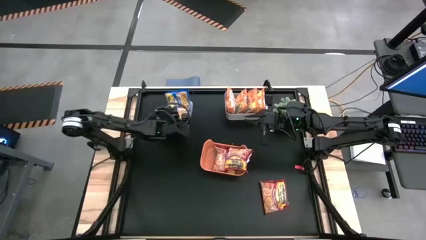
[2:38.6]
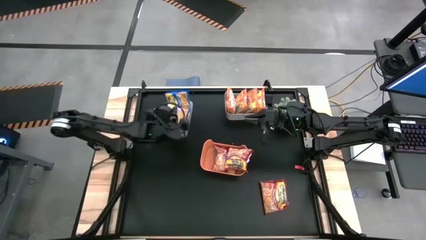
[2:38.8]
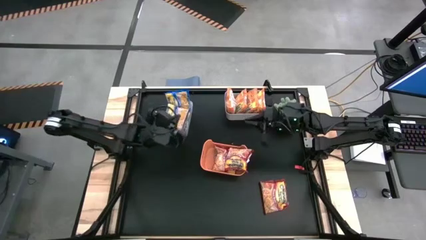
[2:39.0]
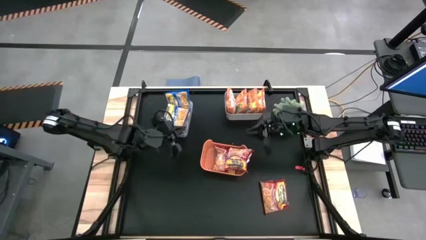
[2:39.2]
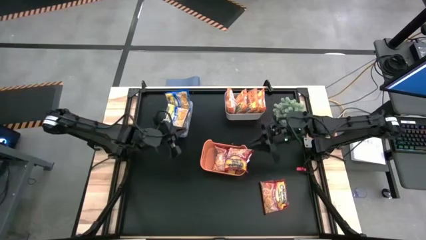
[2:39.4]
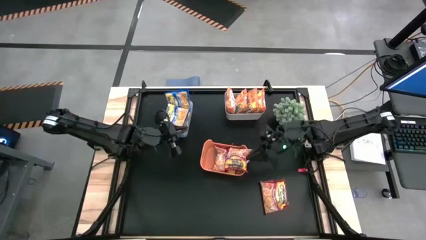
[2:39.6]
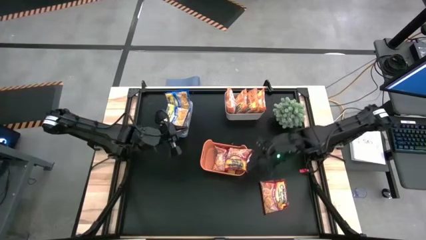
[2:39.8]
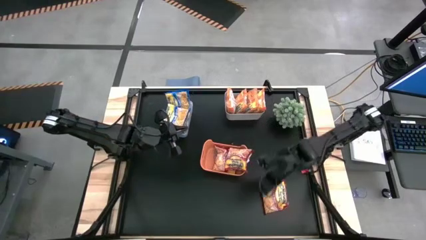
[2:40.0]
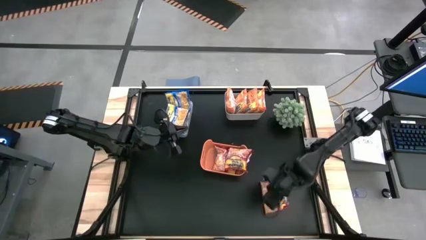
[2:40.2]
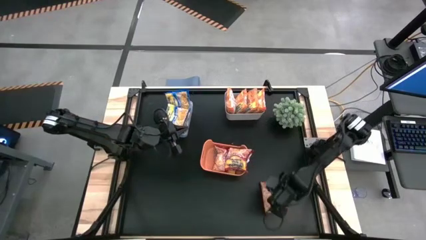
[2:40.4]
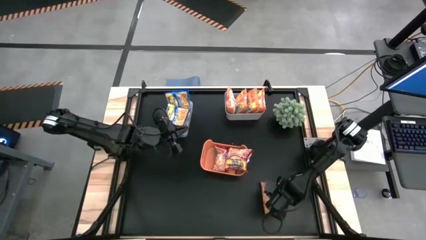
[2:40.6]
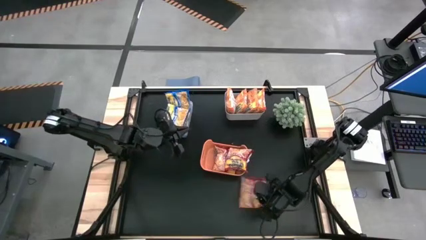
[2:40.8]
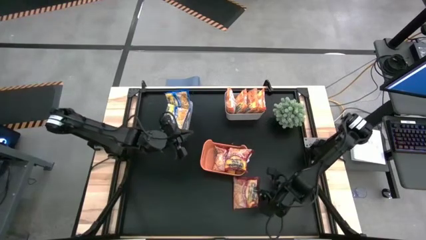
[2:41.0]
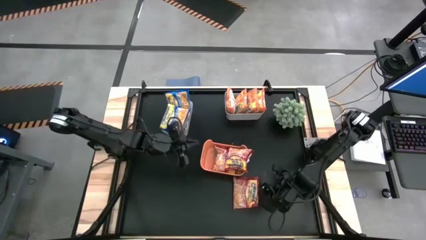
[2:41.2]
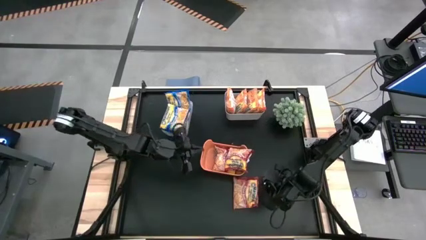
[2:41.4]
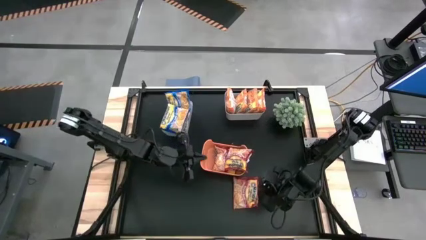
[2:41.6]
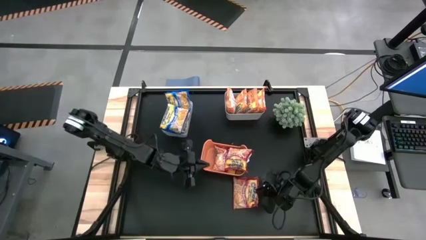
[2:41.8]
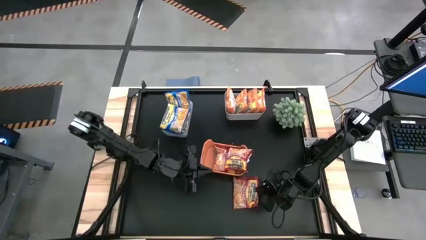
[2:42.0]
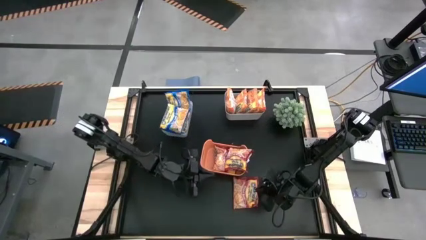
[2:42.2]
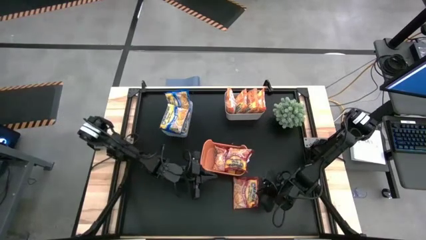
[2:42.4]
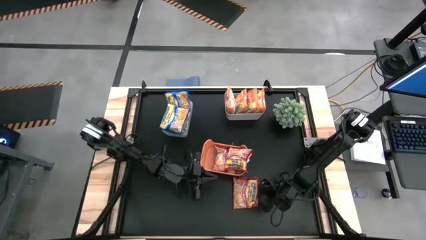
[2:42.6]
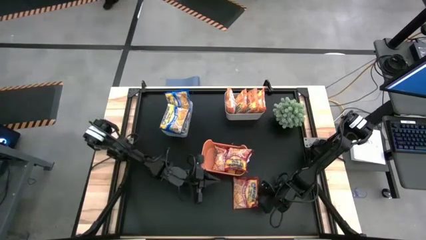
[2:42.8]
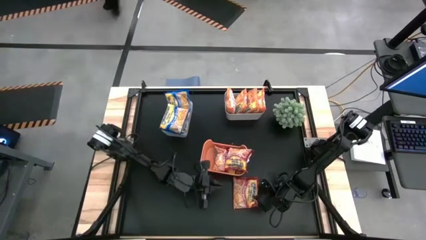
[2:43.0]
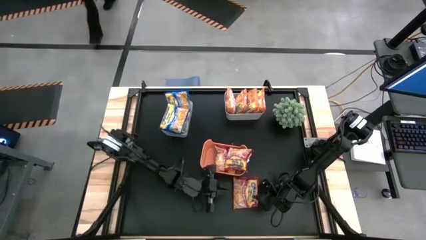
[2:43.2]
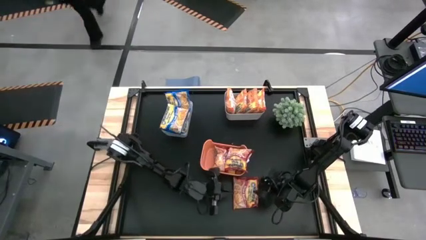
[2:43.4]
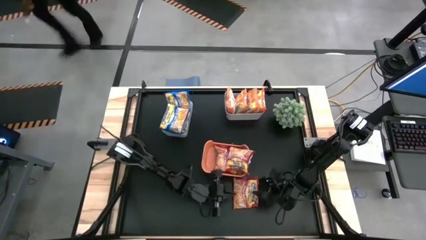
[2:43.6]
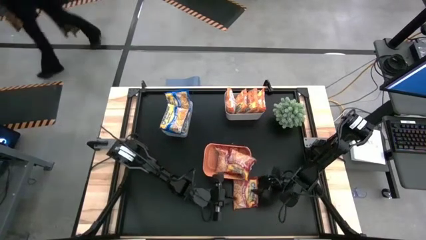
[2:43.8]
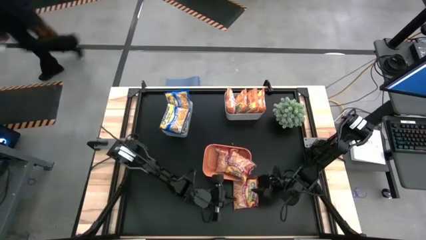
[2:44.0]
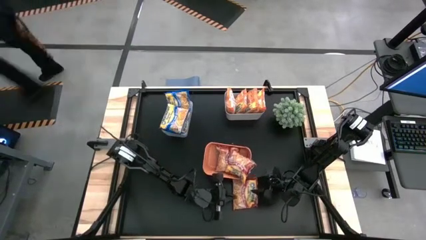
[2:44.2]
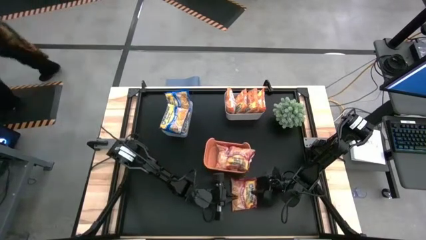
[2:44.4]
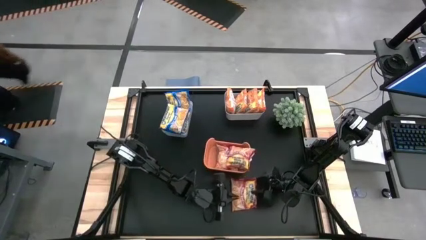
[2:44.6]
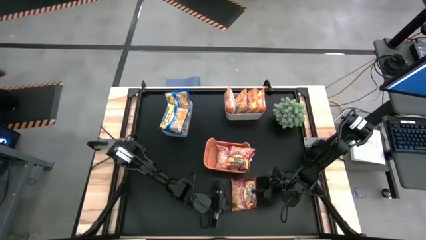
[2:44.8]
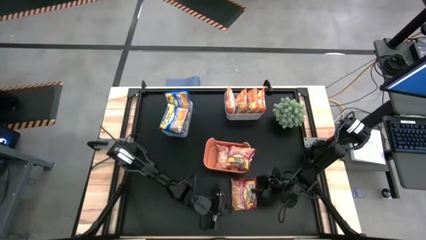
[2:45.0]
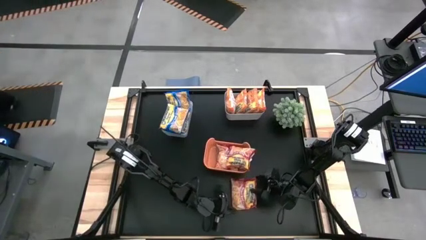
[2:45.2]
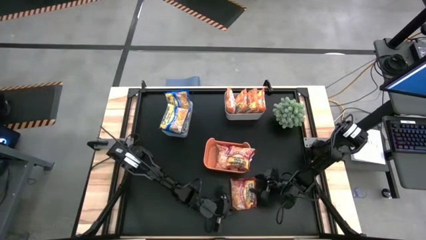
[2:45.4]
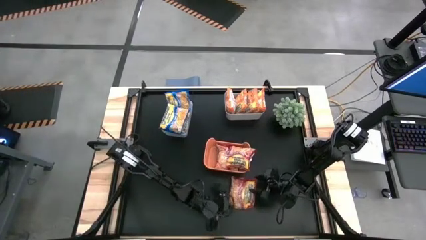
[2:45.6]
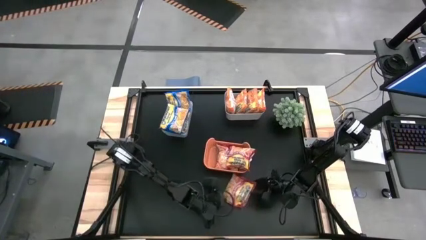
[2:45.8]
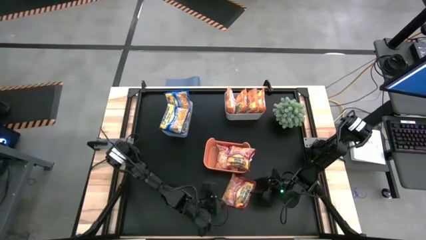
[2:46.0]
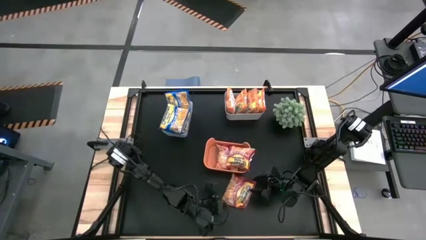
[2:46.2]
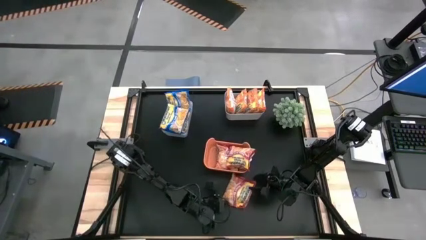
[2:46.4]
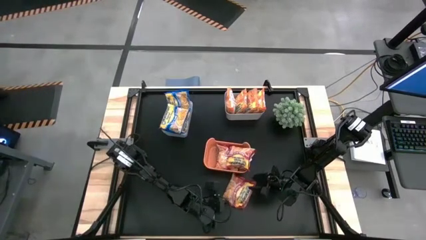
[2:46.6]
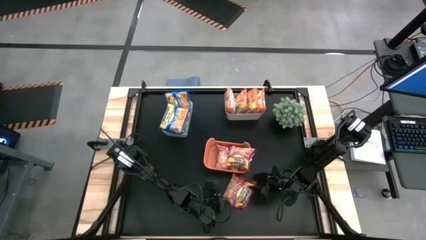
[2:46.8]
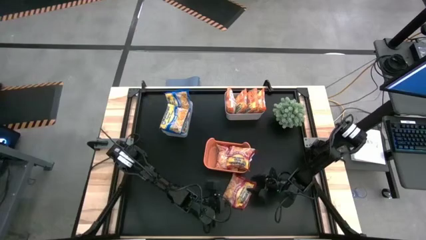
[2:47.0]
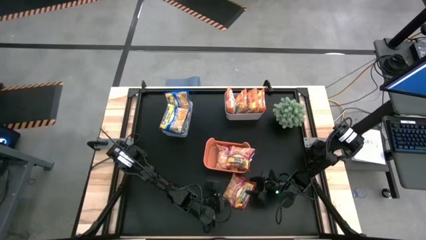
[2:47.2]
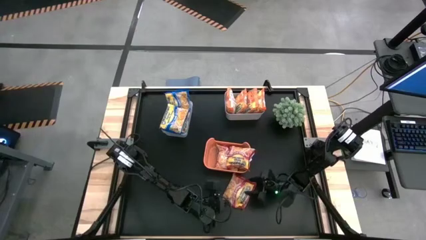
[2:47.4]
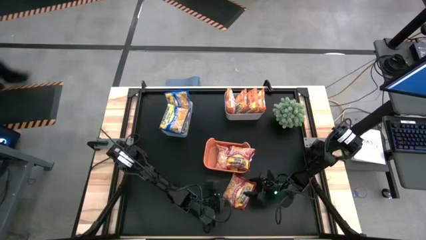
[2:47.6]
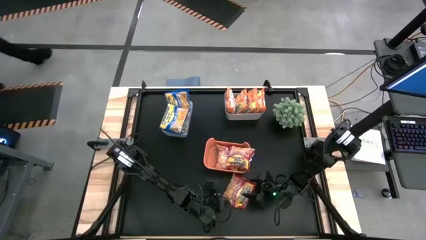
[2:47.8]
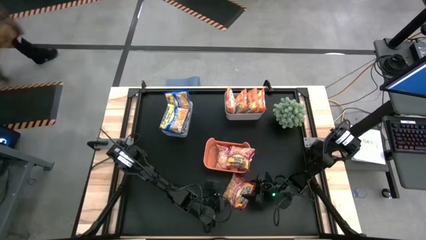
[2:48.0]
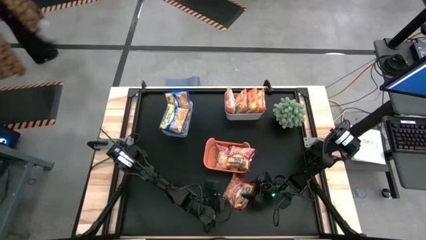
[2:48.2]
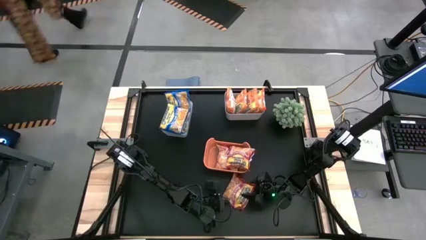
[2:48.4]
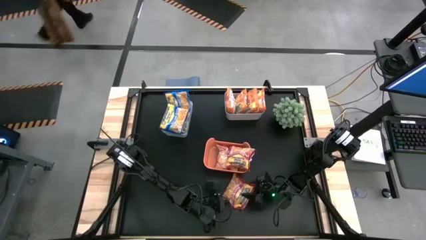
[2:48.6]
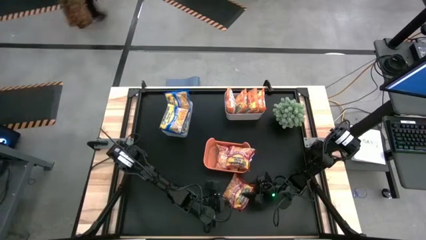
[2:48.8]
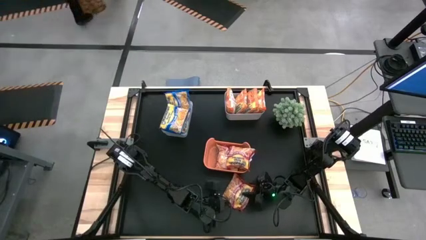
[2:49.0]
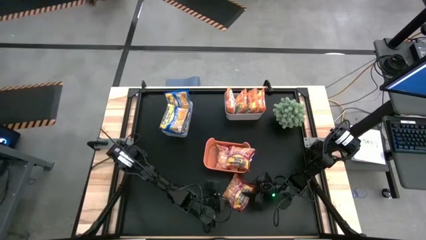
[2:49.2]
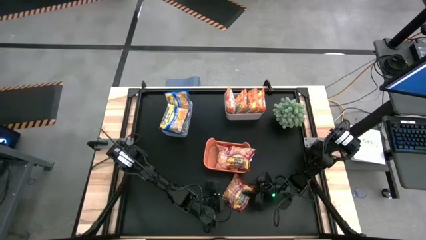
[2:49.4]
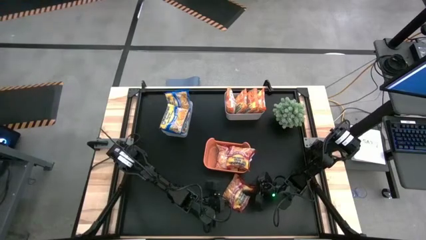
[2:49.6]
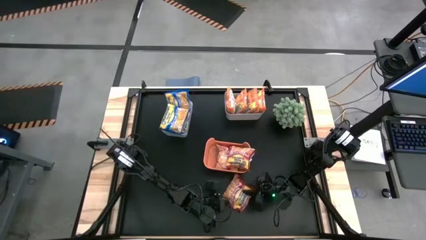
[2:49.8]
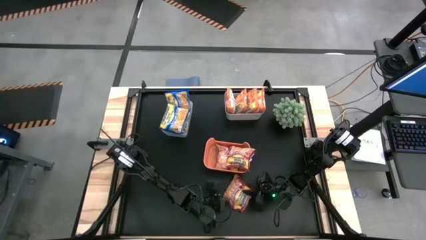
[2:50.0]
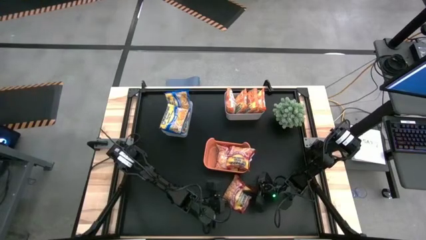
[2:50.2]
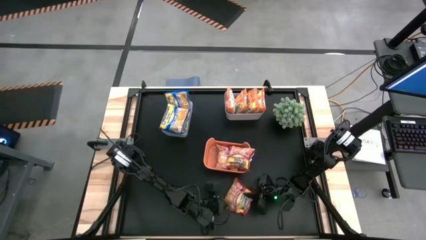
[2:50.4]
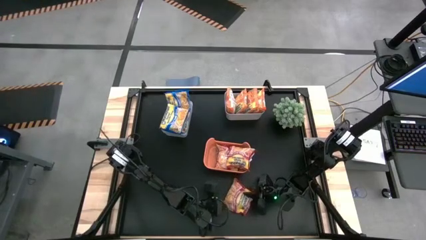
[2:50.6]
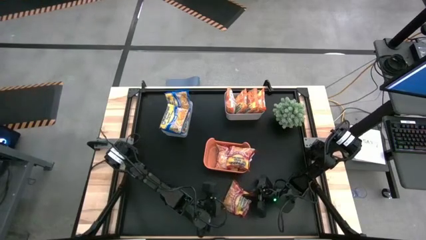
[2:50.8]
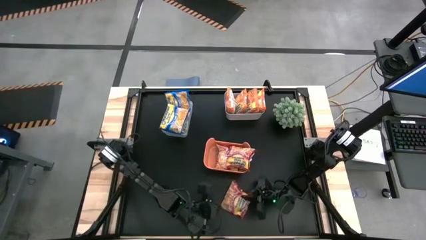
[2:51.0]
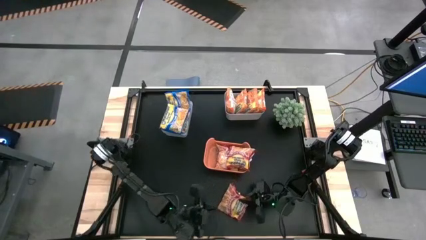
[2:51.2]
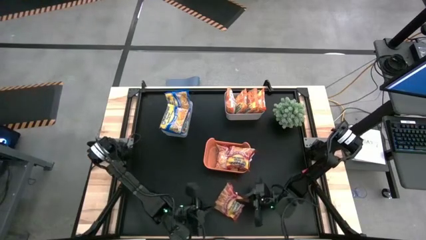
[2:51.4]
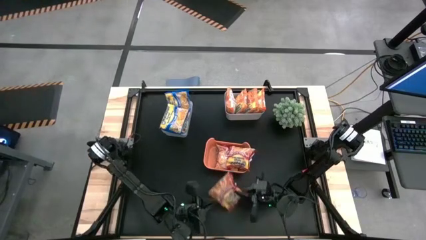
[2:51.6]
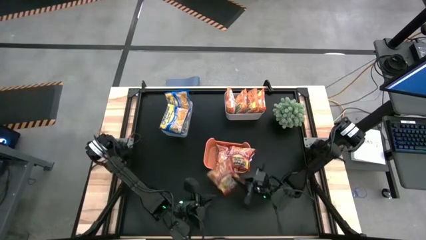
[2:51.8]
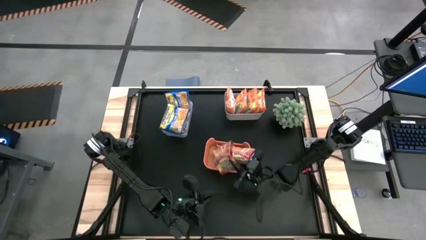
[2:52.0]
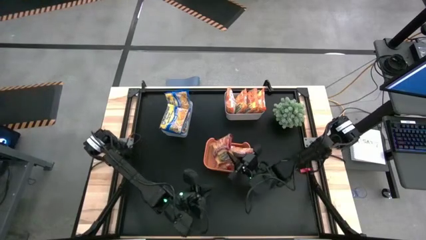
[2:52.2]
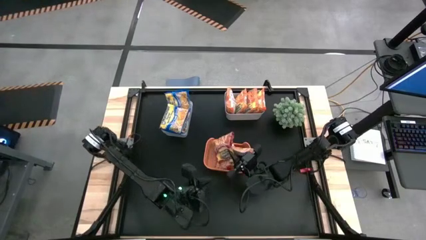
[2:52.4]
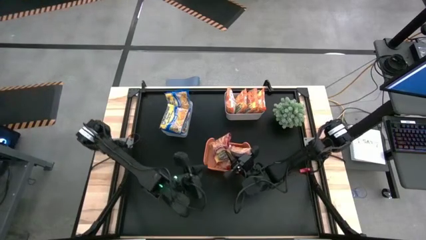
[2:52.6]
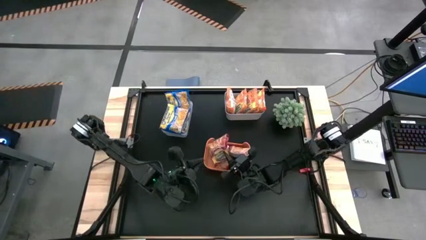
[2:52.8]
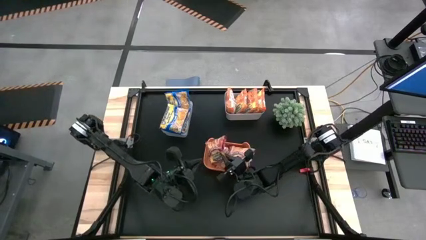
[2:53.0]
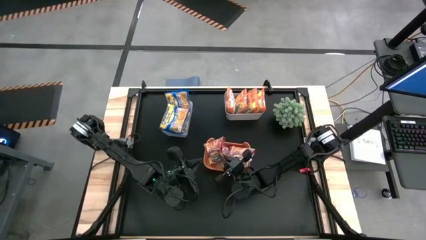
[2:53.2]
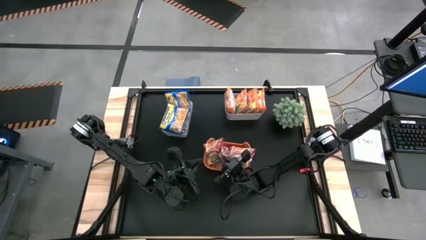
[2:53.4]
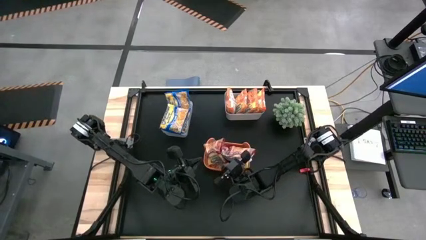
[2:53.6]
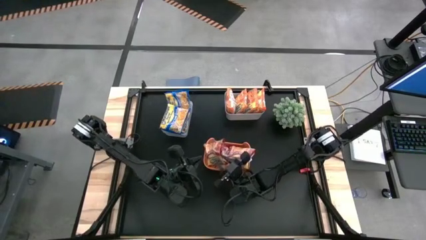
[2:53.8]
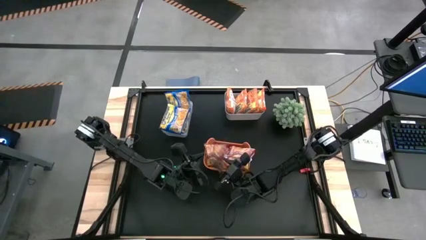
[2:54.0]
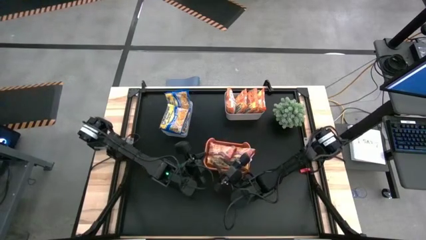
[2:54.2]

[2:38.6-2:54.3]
Task: Sort Maruchan noodles
Put the red noodle packet into the orange bin
